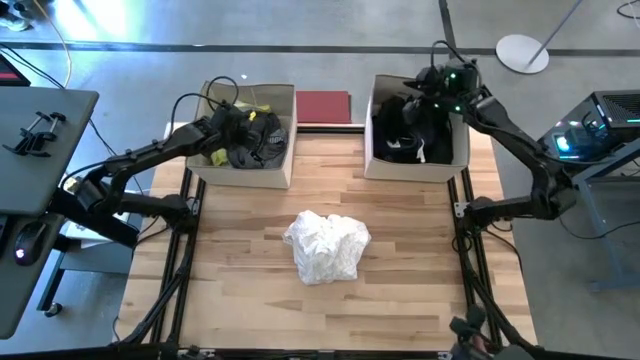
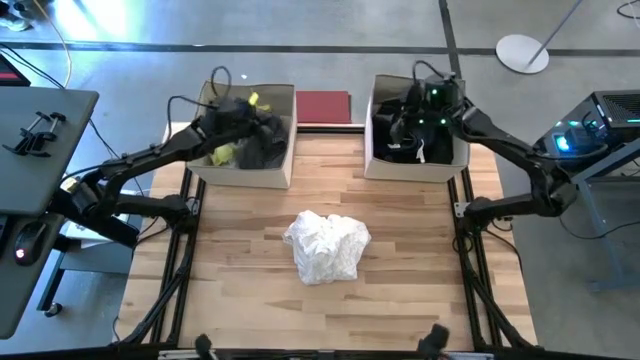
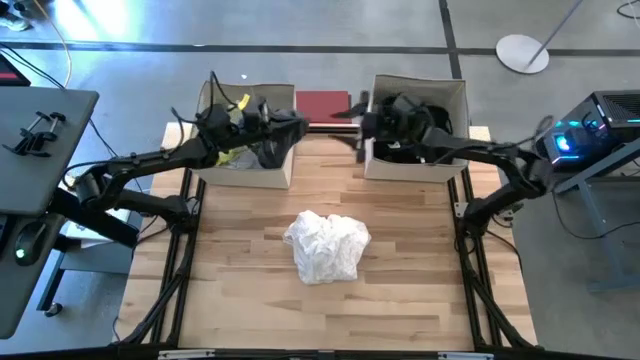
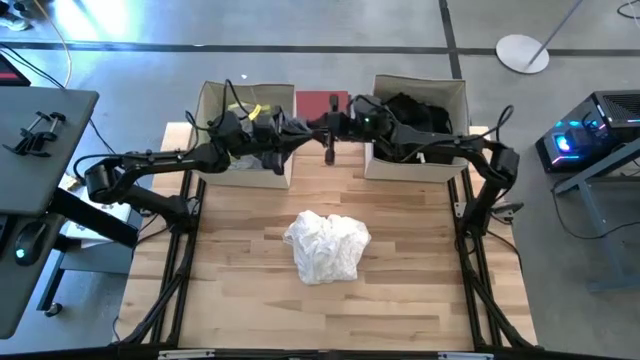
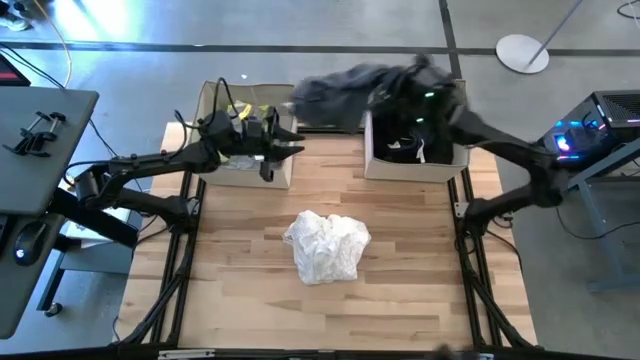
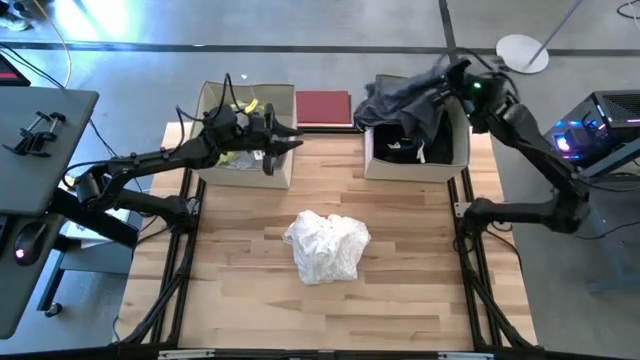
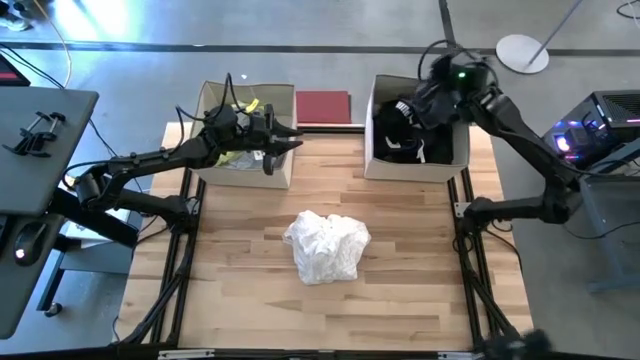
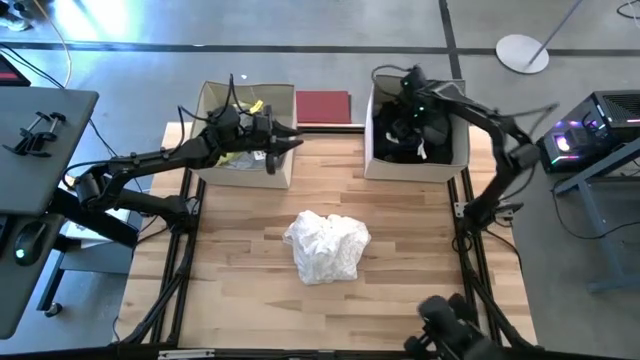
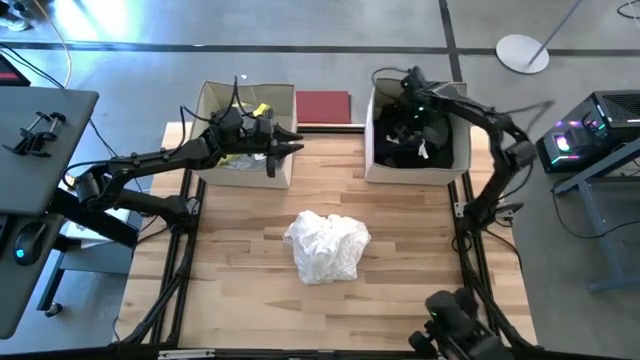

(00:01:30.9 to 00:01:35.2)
Task: Sort clothes
Put the grey boxers from the left laundry organizer into the right brown laundry organizer

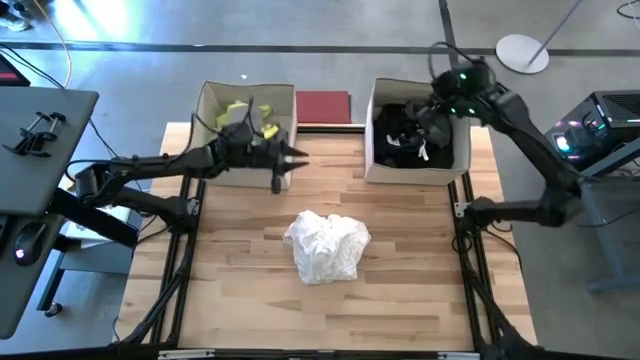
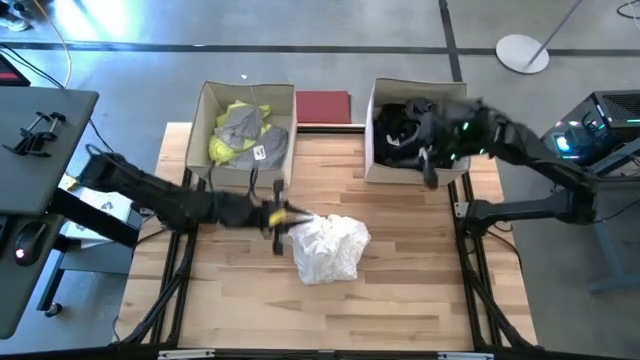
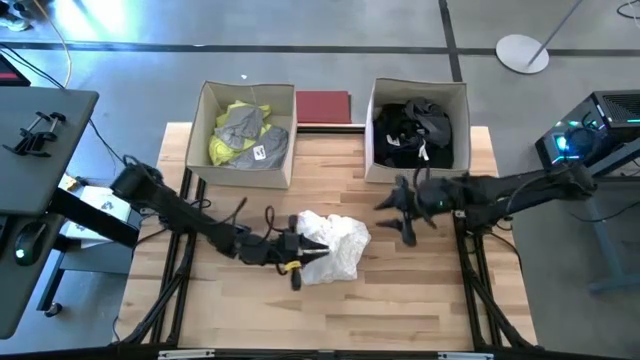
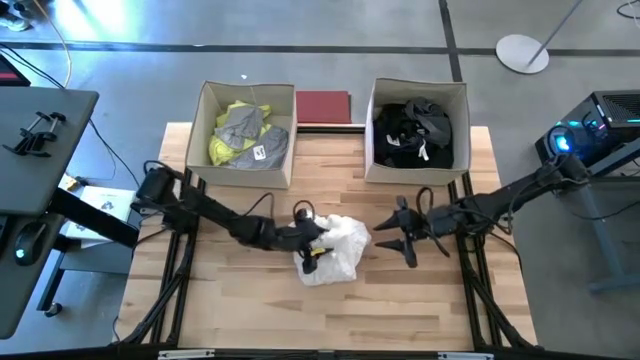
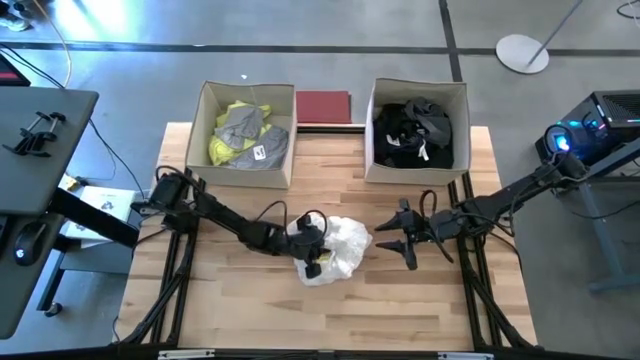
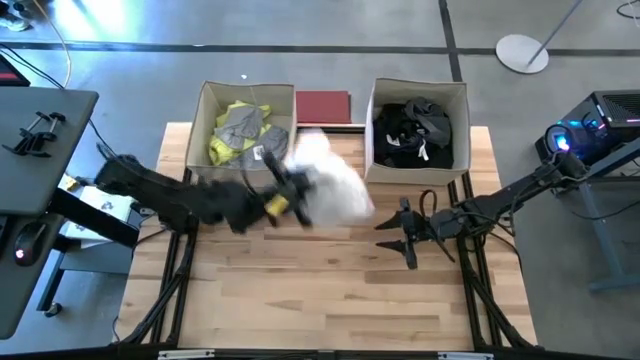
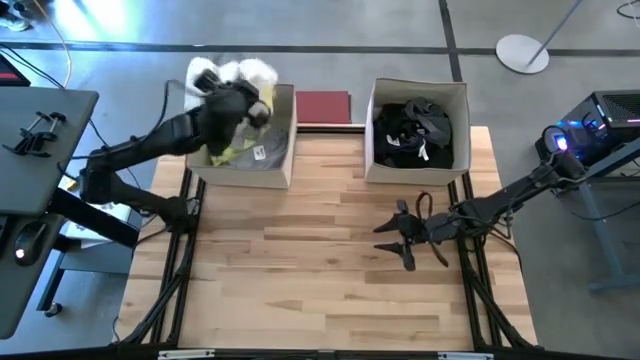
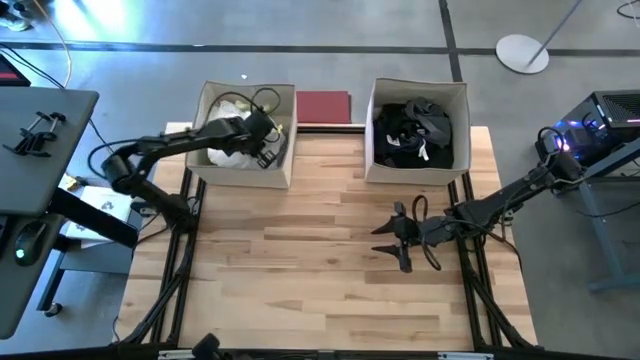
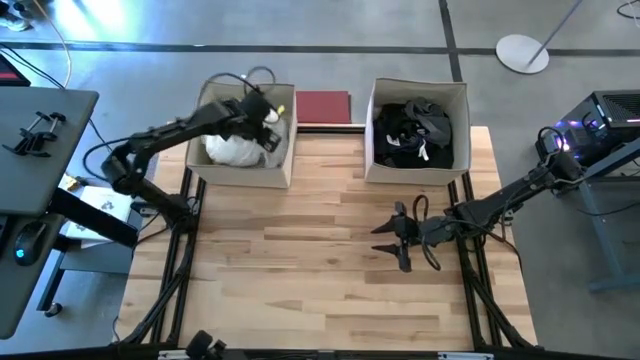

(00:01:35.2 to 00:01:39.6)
Put the white blouse into the left brown laundry organizer

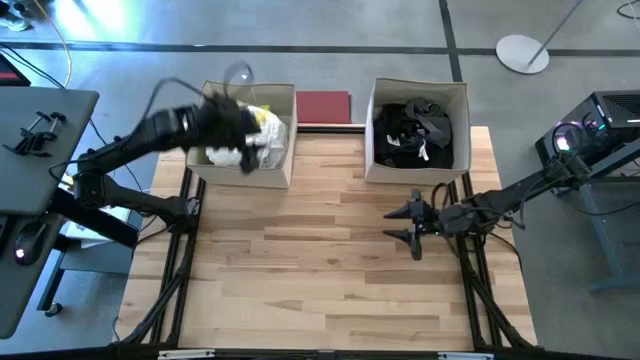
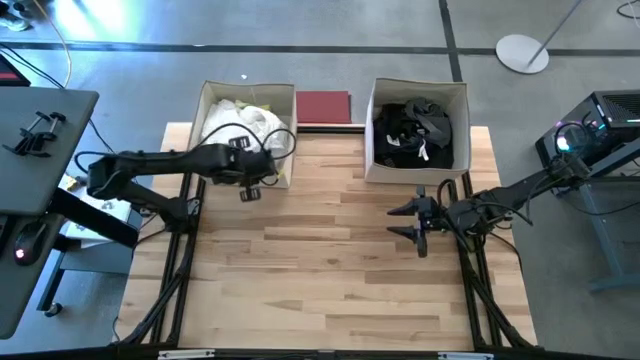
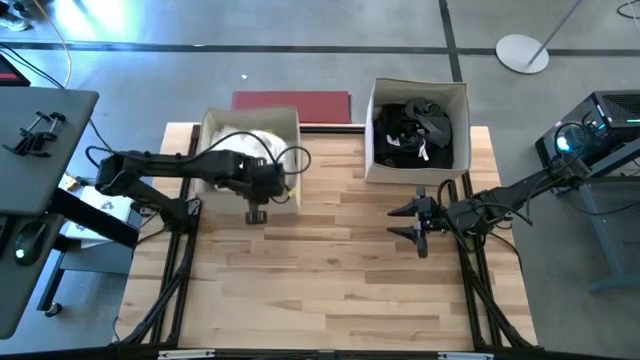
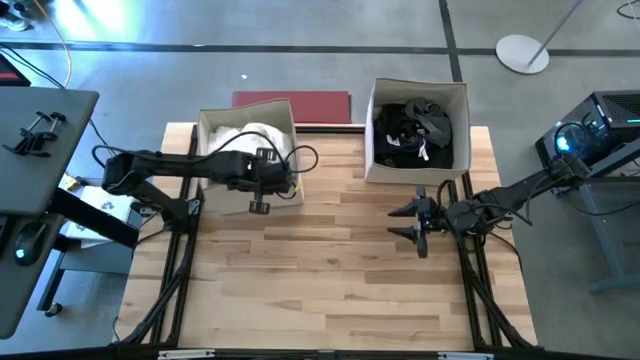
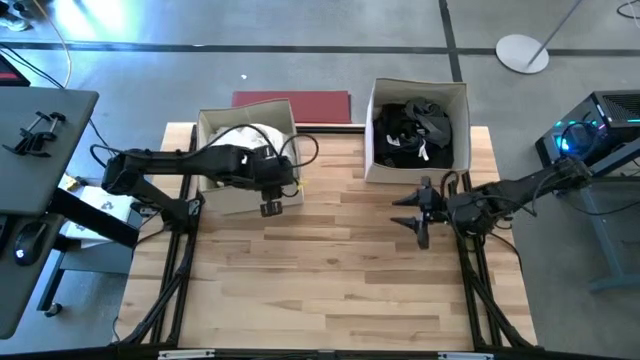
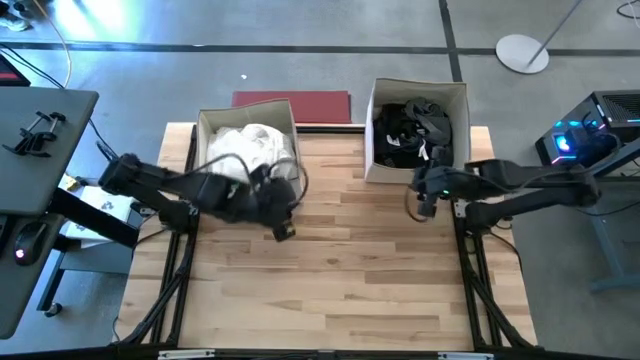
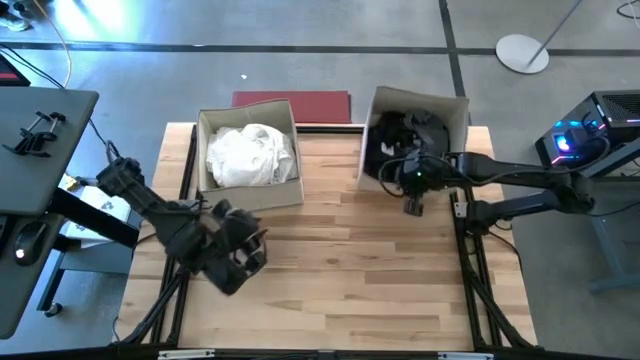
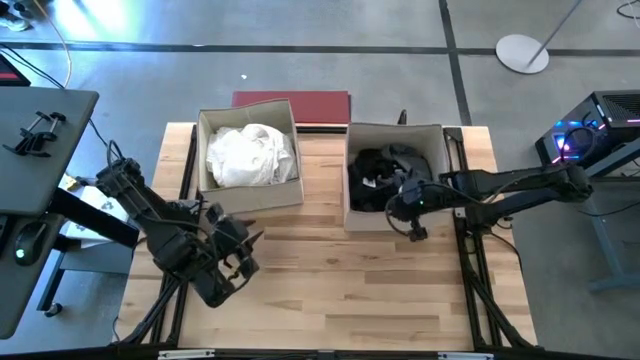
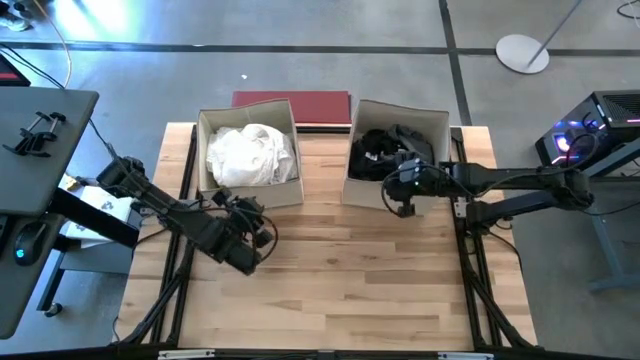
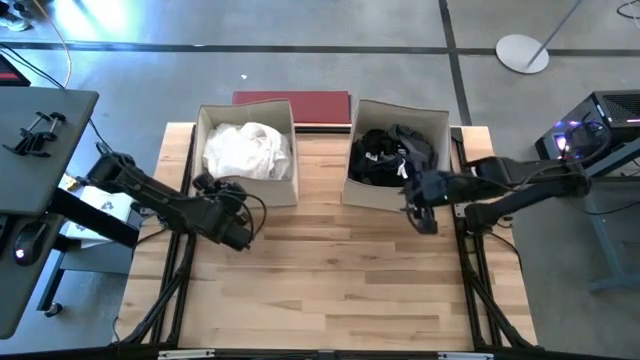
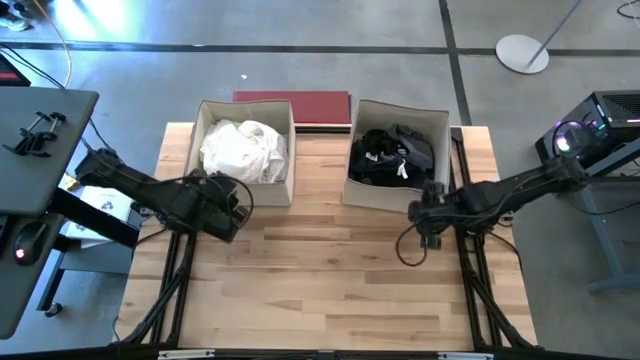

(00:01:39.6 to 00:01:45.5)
Adjust the brown laundry organizer

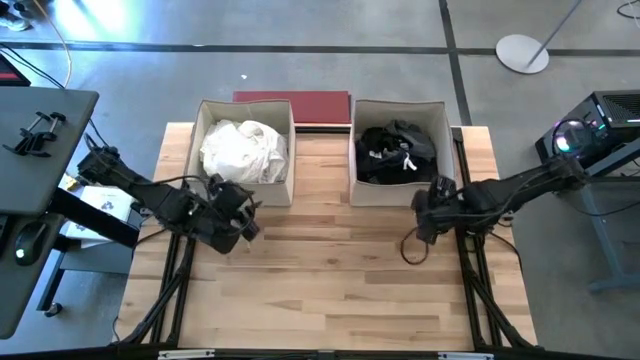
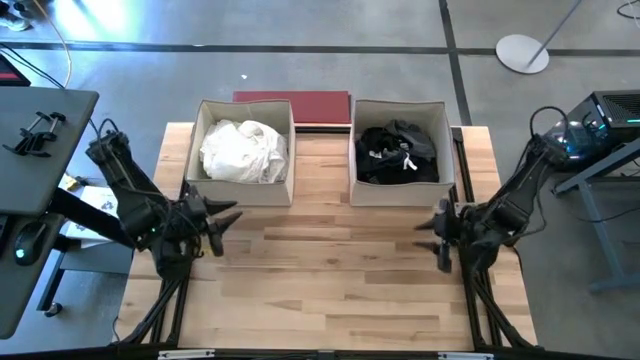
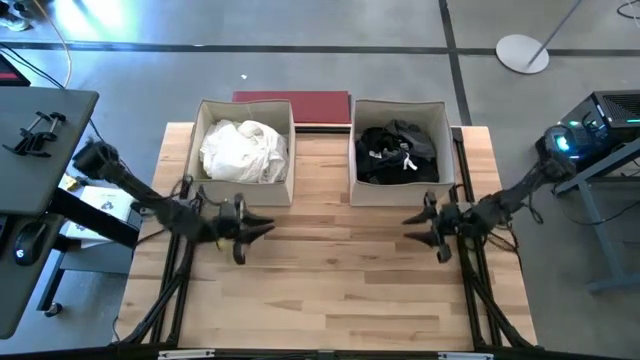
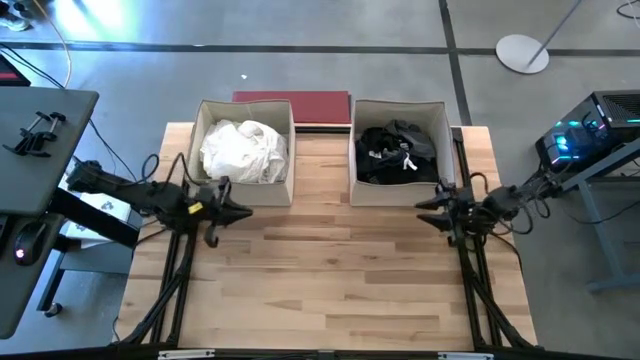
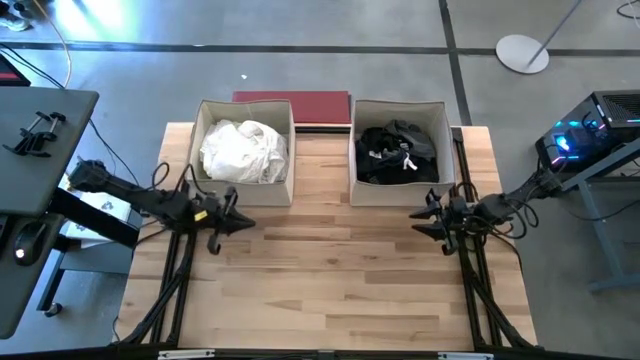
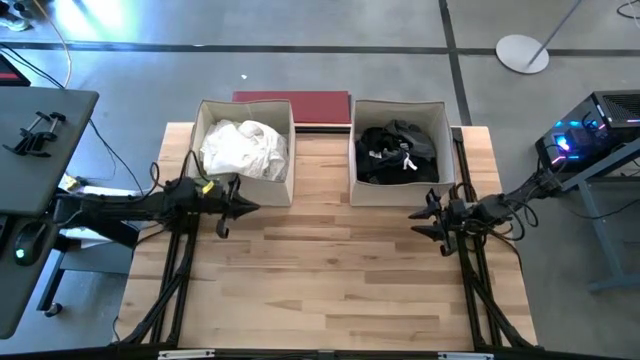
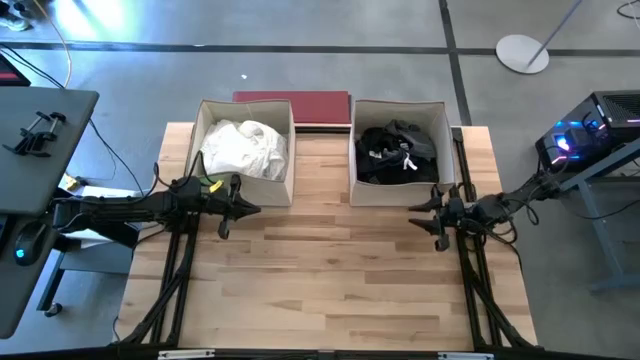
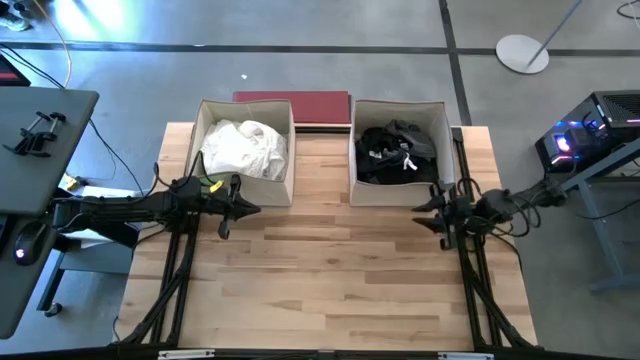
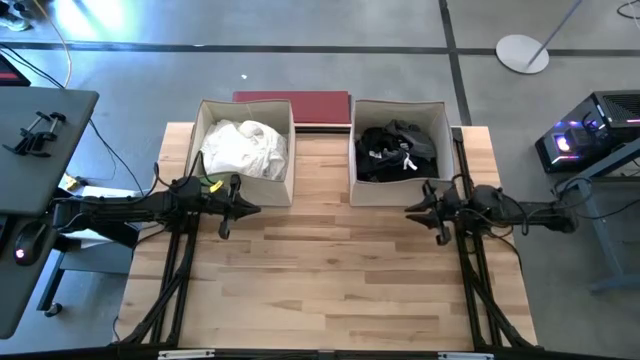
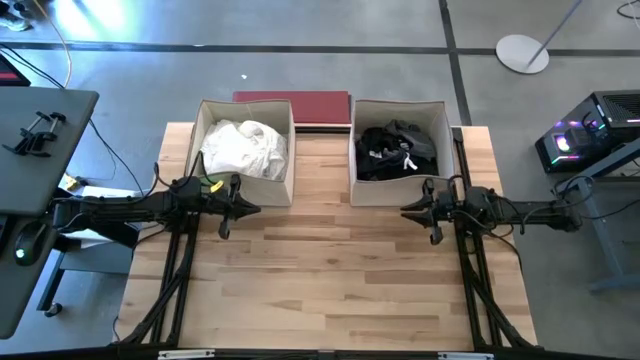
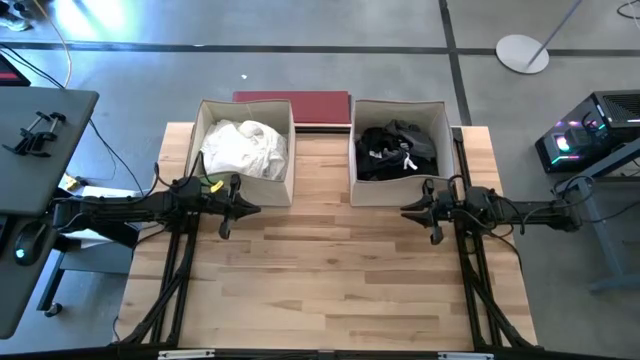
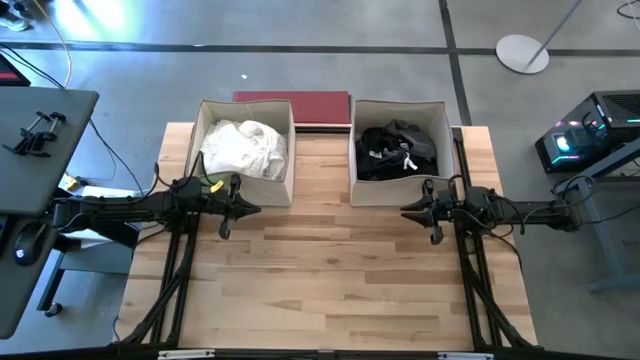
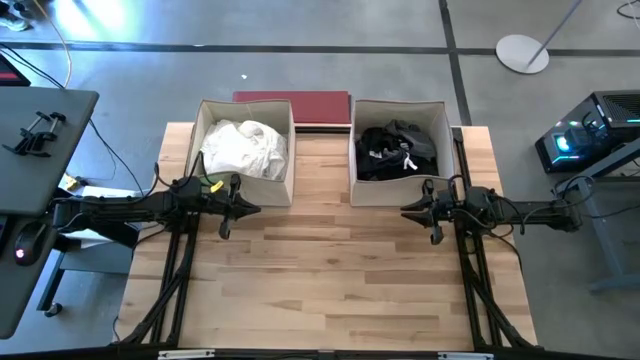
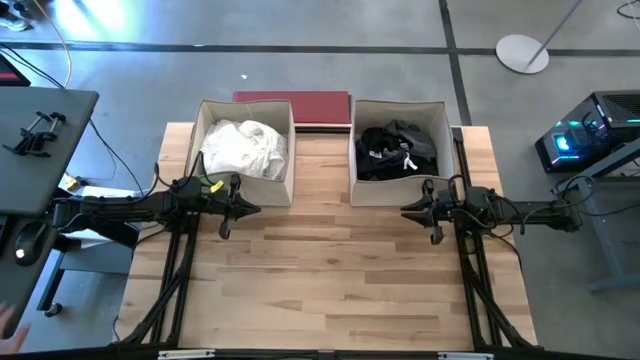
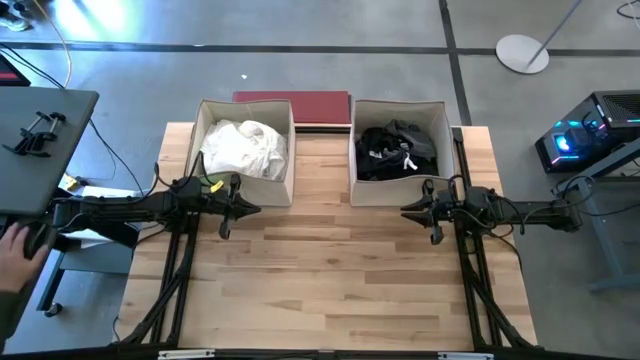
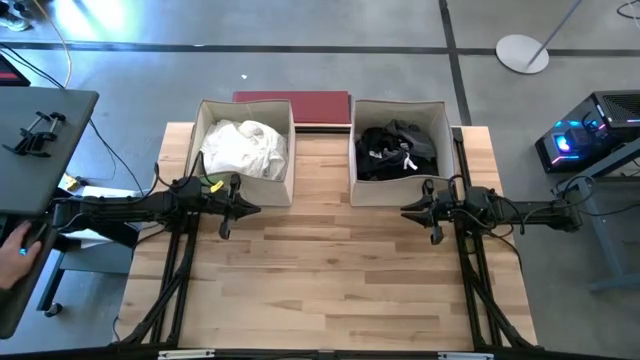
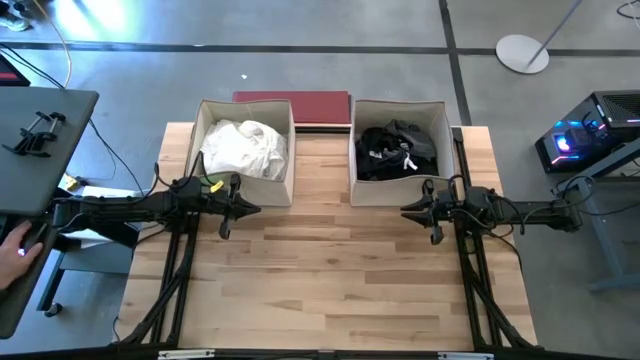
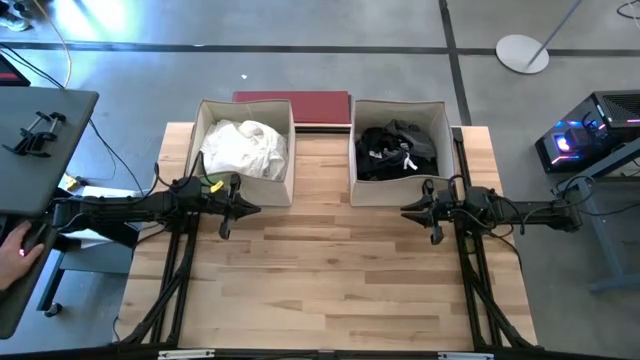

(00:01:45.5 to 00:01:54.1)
Return to Home Position
